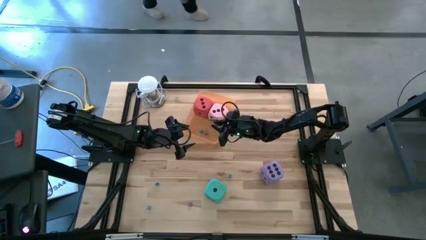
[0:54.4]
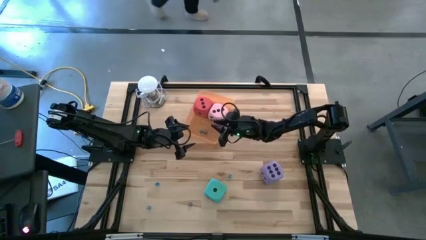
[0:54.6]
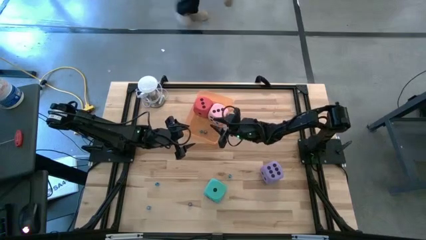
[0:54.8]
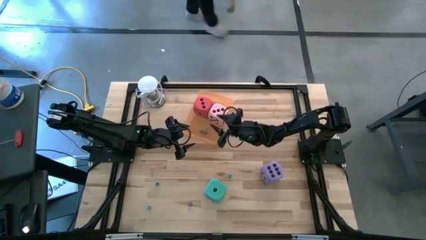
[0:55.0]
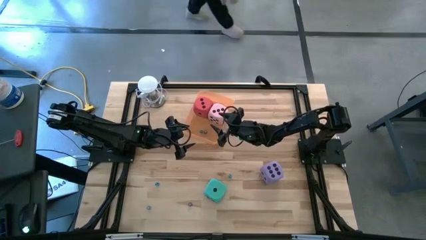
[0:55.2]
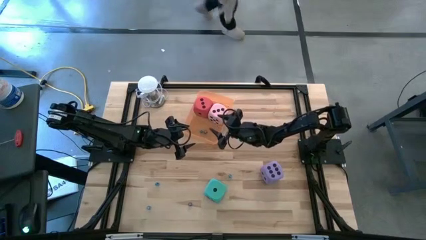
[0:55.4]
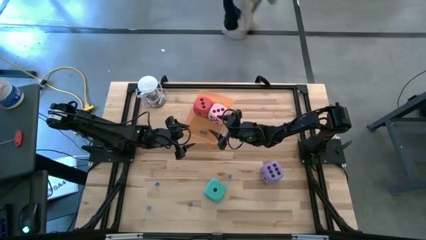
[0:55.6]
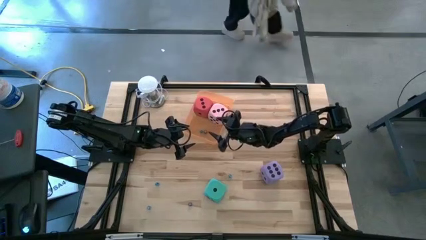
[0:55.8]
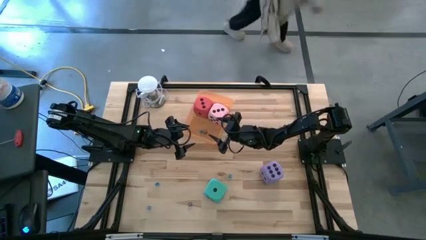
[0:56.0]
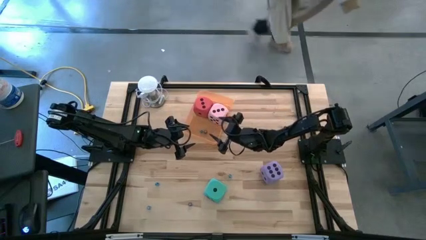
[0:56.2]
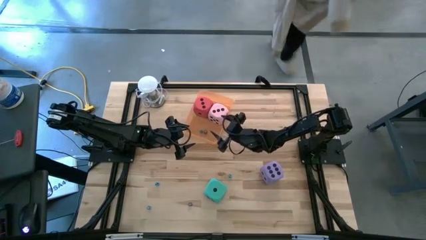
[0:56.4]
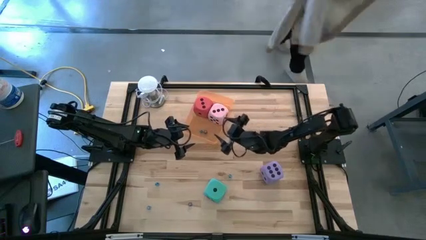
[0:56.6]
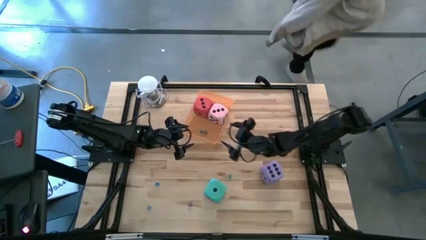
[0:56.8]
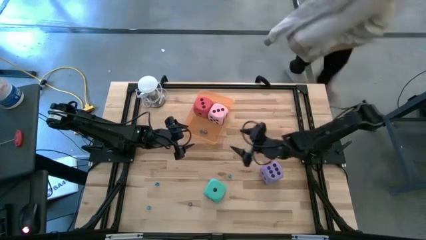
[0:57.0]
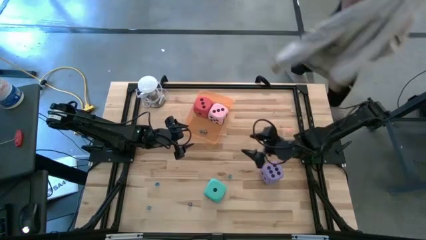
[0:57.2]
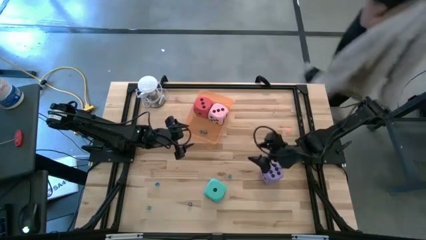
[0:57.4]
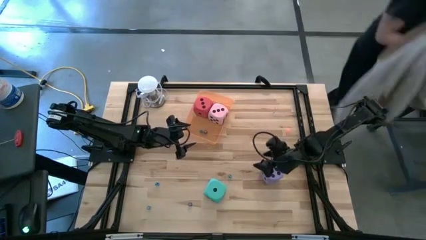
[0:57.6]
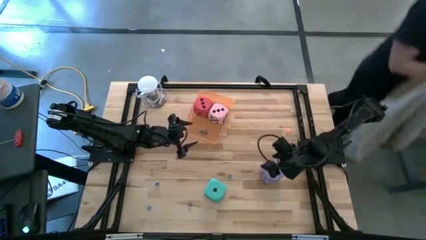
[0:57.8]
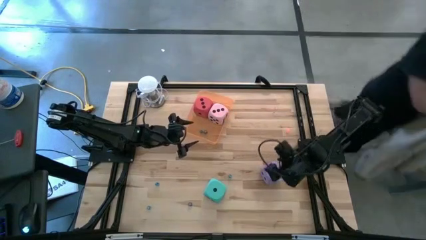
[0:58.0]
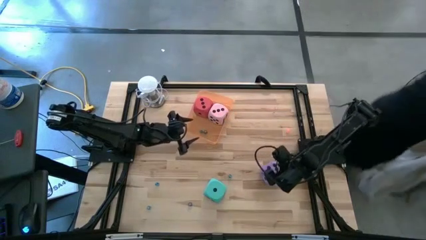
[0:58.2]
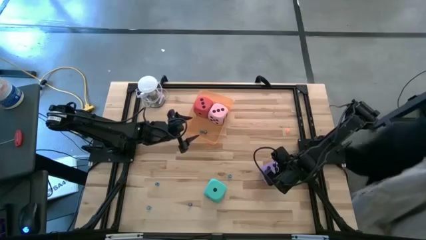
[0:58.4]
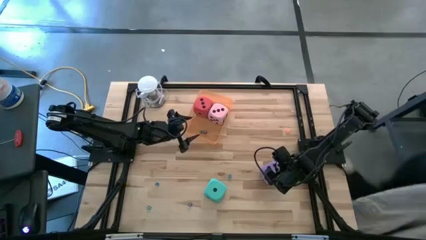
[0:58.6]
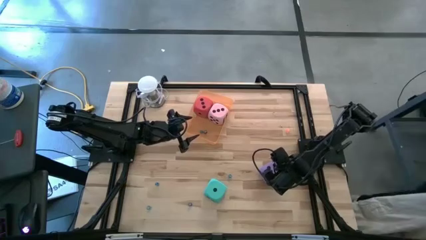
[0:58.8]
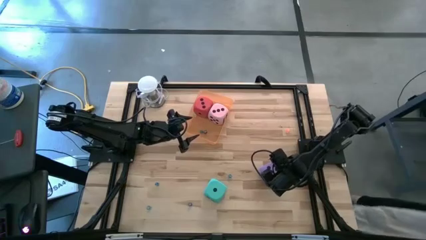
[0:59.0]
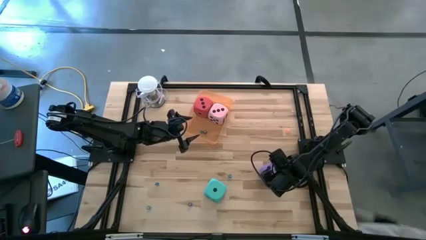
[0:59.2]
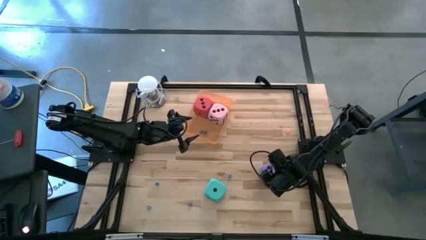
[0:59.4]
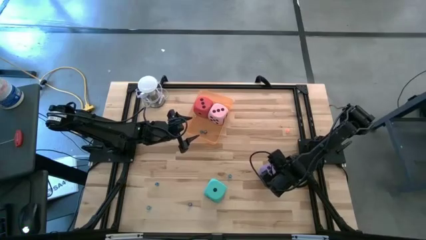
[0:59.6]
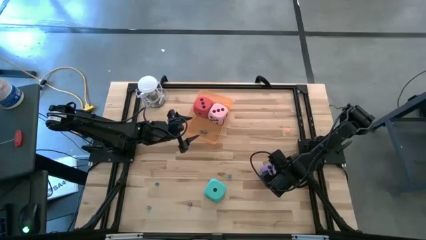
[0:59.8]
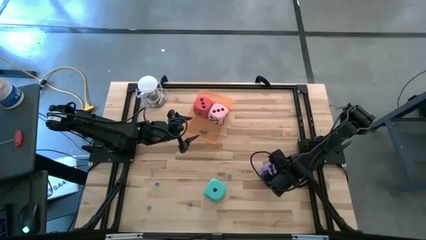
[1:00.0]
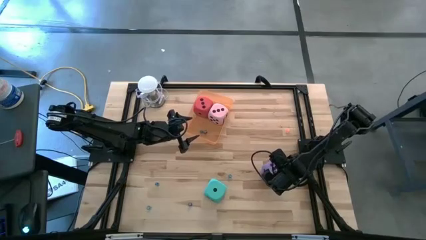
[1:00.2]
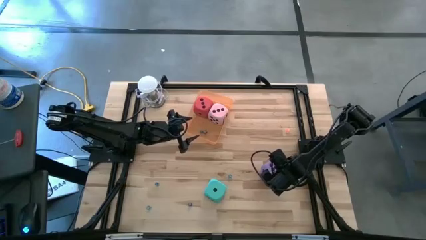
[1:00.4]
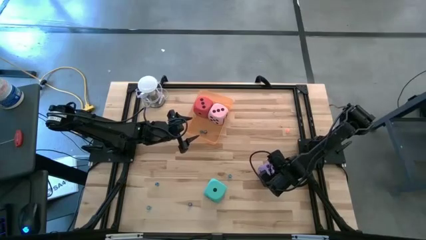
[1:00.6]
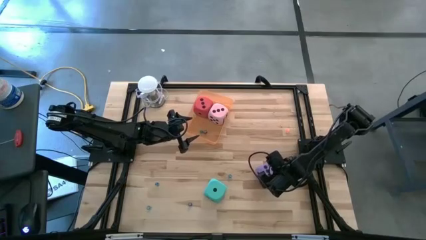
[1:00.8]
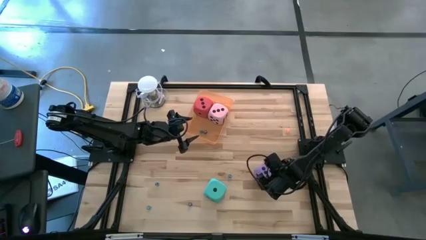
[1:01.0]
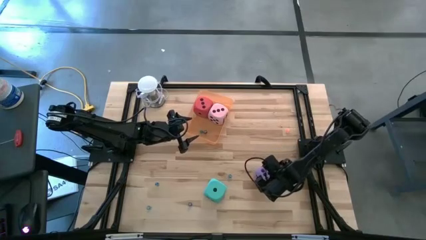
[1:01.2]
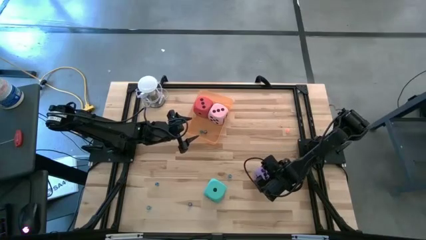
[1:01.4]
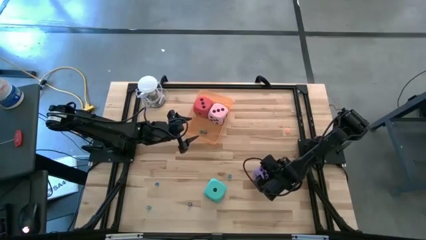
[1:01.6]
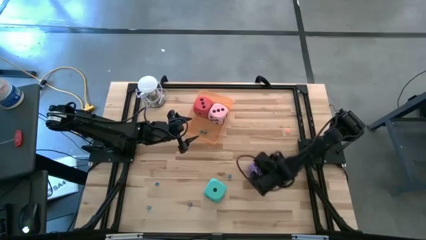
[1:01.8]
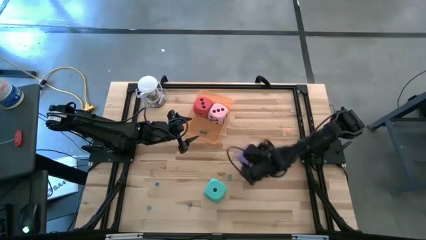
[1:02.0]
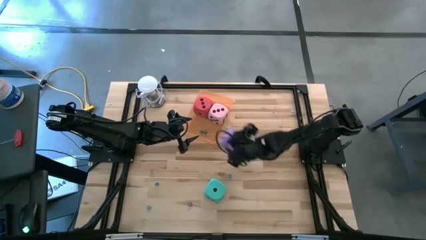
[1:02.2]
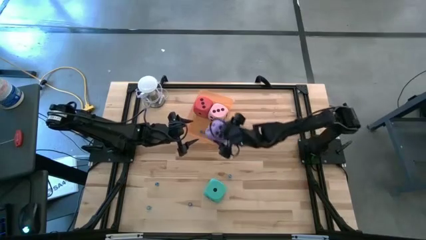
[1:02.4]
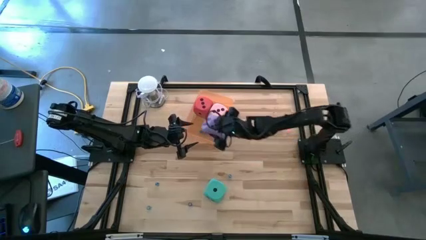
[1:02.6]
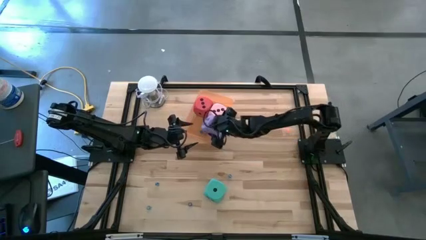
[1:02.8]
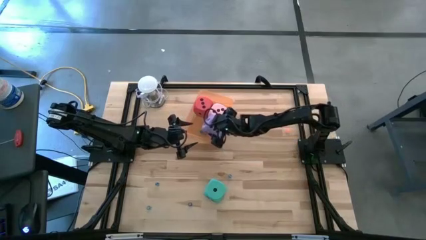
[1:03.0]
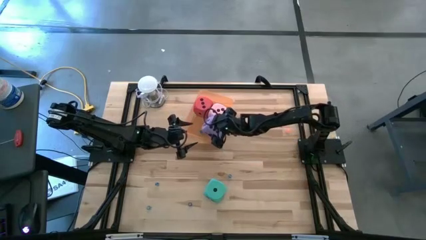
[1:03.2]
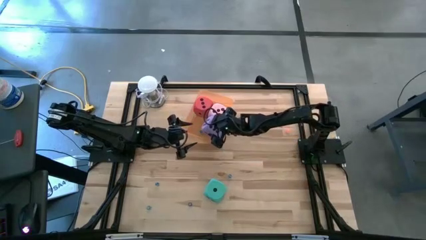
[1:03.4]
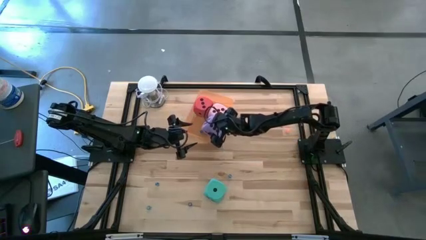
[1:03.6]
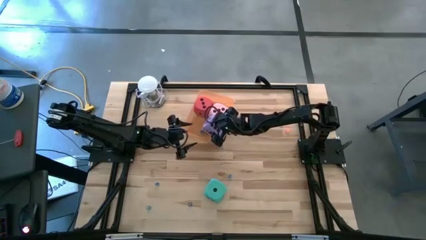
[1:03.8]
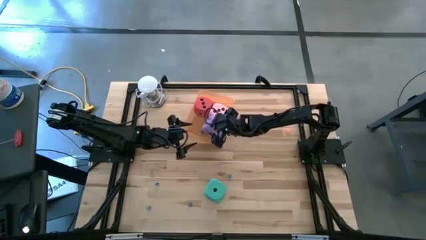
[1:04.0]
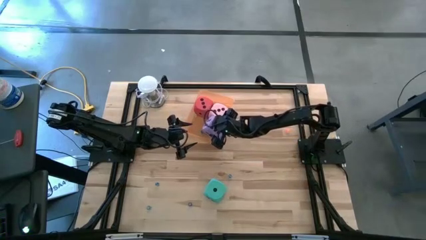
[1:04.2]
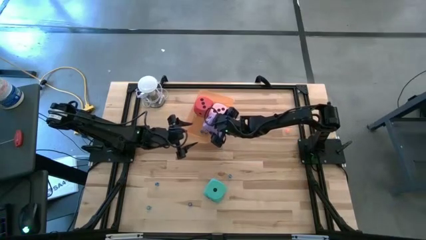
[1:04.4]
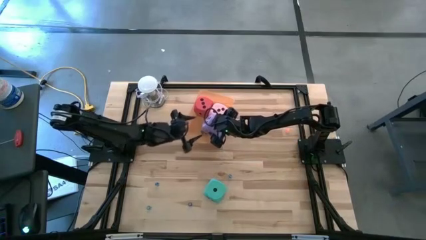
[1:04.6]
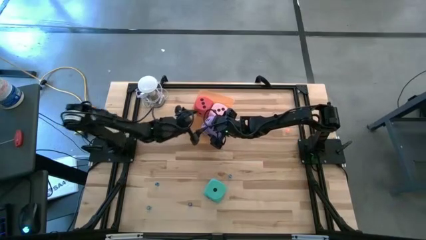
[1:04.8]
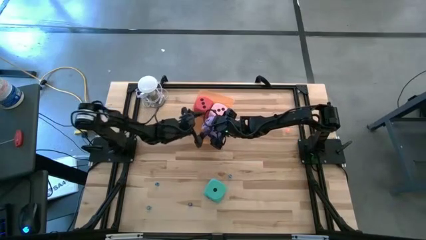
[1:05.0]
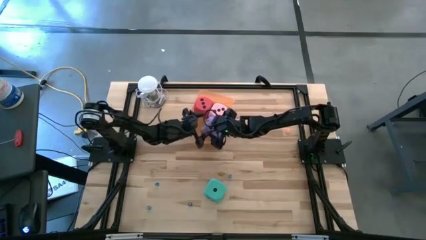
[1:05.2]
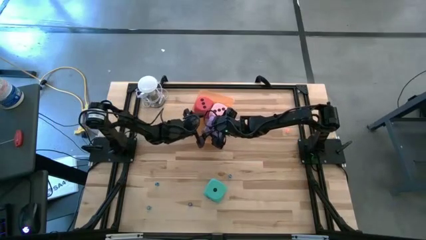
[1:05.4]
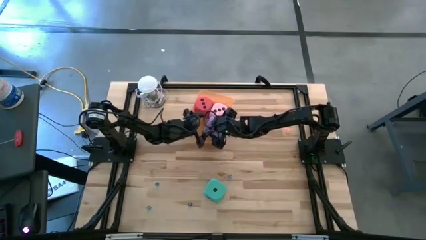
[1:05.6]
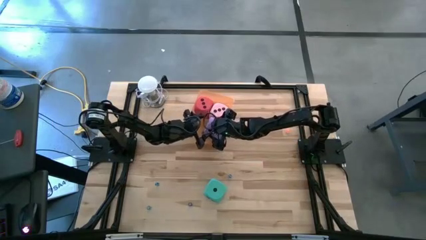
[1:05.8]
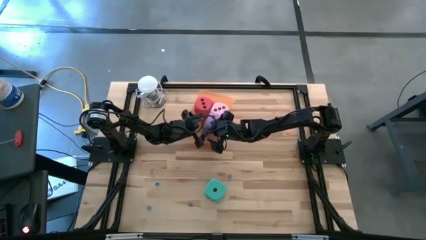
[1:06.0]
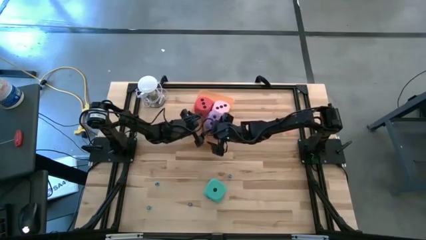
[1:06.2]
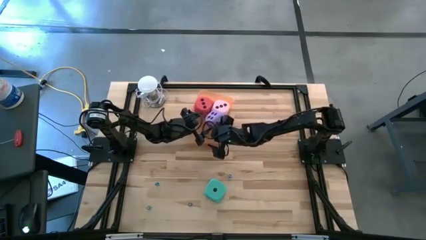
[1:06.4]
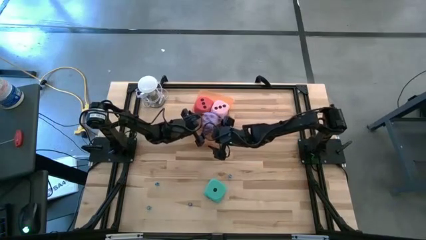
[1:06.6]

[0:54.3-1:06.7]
Task: Pick & Place Dice
Put the big purple die into the orange bin

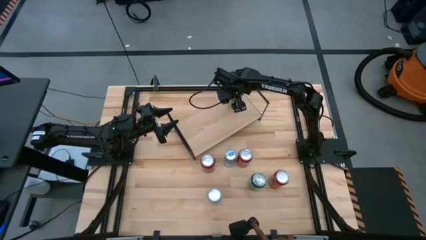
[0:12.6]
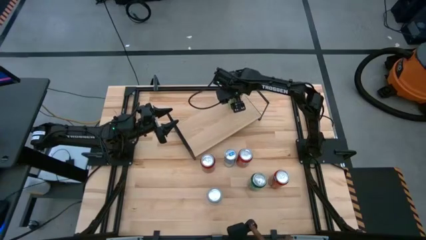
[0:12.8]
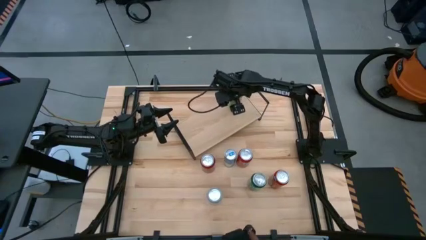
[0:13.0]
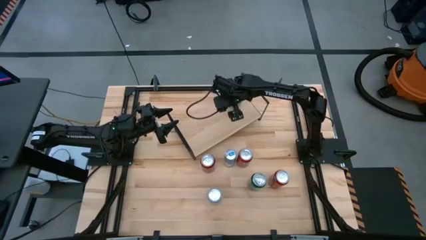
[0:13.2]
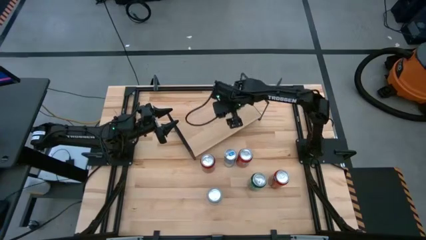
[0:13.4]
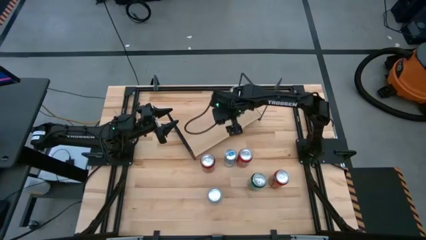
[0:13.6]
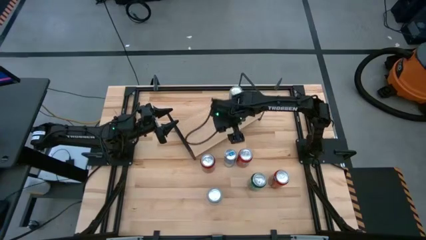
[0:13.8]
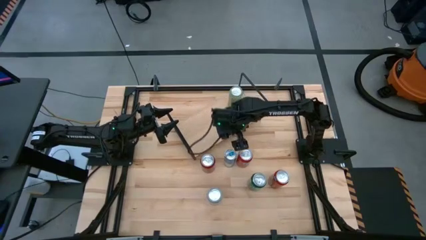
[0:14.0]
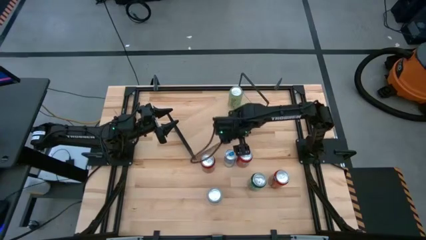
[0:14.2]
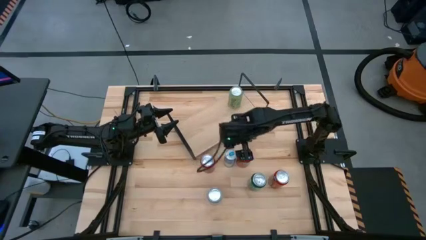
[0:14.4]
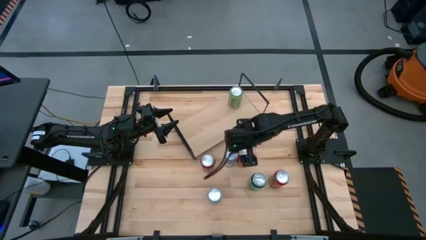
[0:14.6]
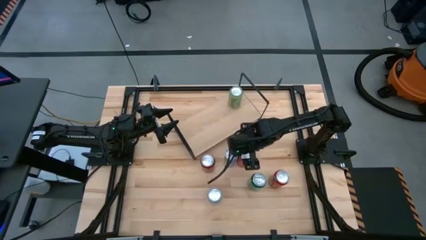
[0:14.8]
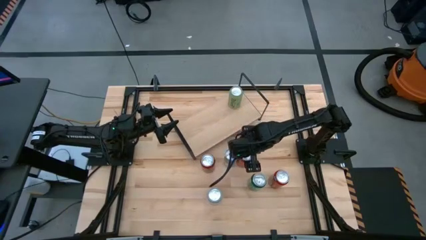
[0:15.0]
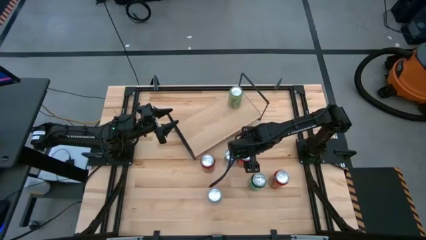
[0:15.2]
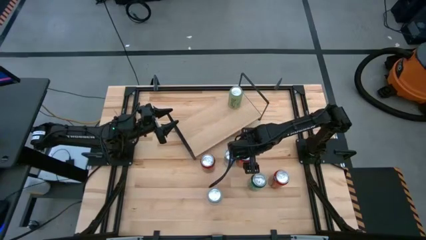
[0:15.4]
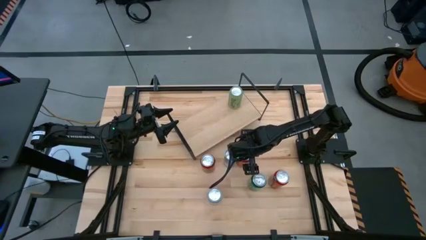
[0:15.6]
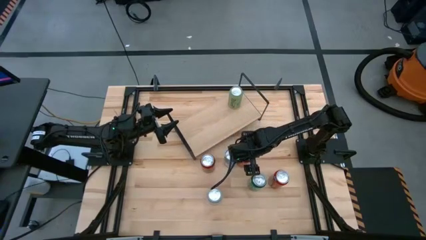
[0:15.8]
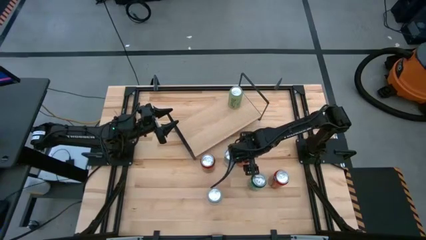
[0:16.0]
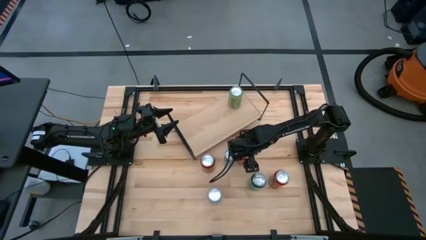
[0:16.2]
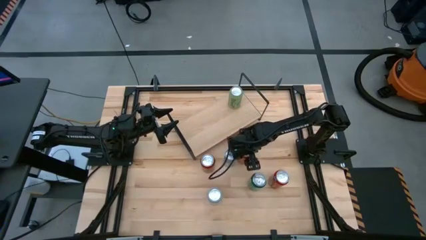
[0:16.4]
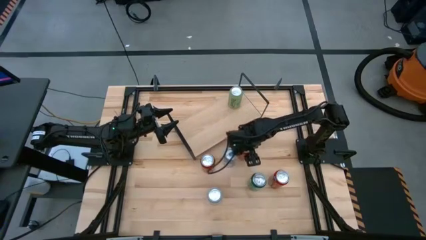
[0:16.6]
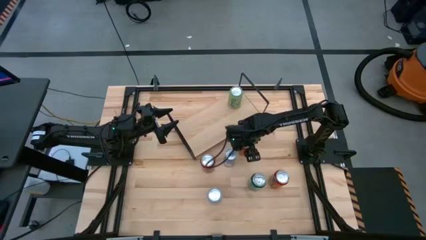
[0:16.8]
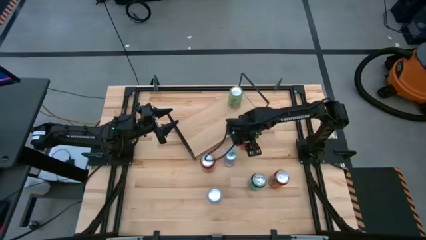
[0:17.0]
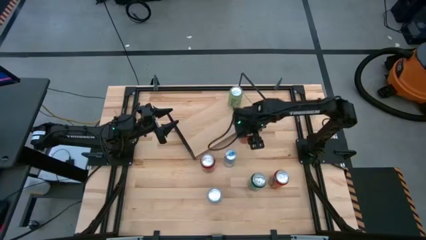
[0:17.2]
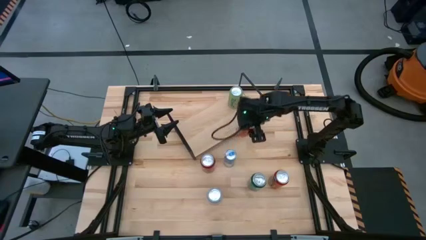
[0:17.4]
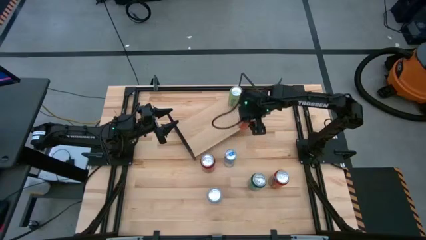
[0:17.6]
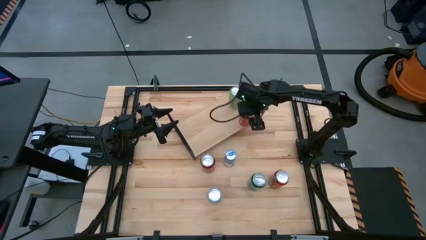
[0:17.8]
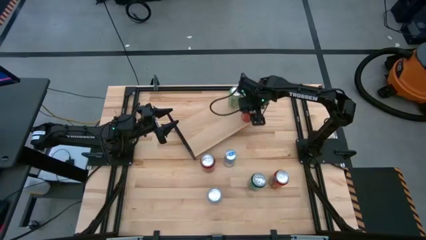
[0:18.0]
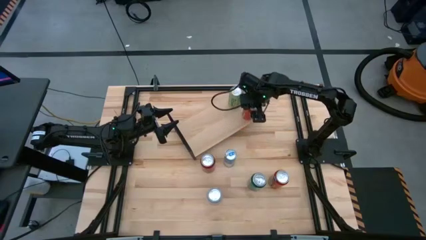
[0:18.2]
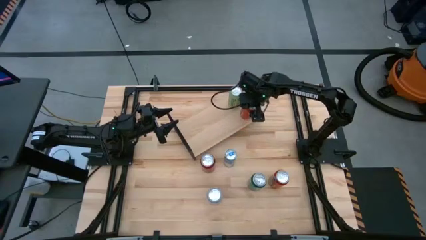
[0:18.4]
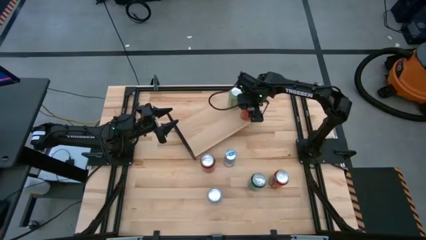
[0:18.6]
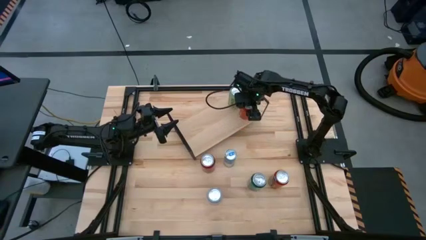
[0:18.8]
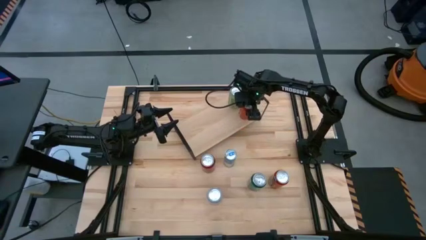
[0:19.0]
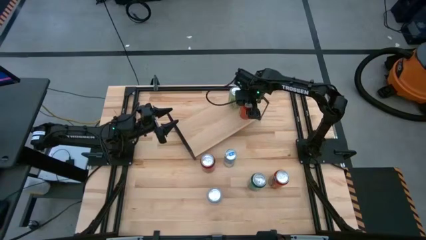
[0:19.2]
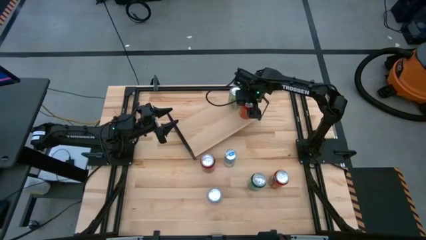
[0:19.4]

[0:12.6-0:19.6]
Task: Place canned beverage on shelf
Put the top orange soda can on the shelf aligned with the light green soda can
